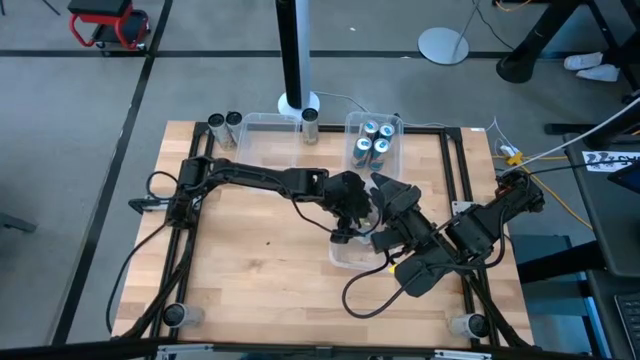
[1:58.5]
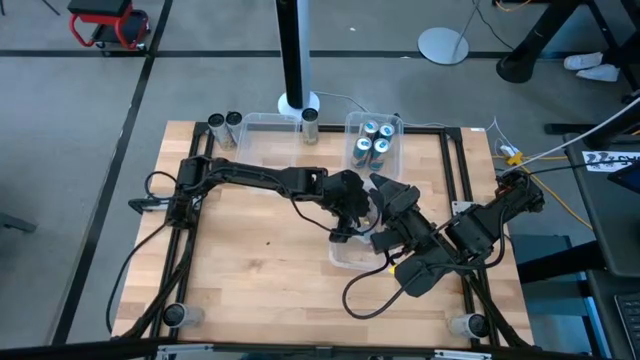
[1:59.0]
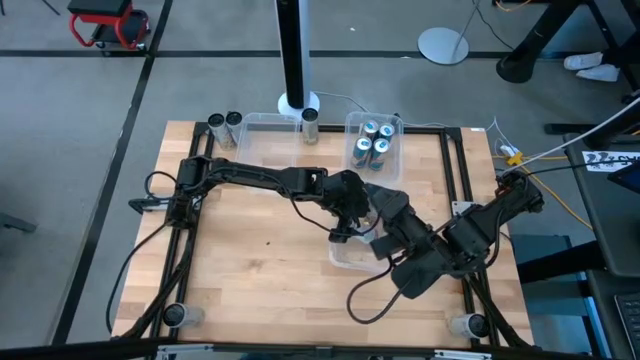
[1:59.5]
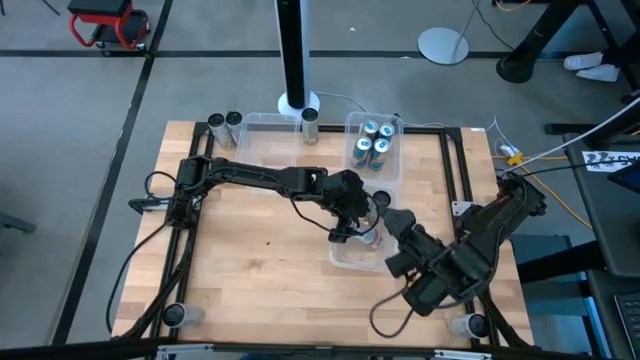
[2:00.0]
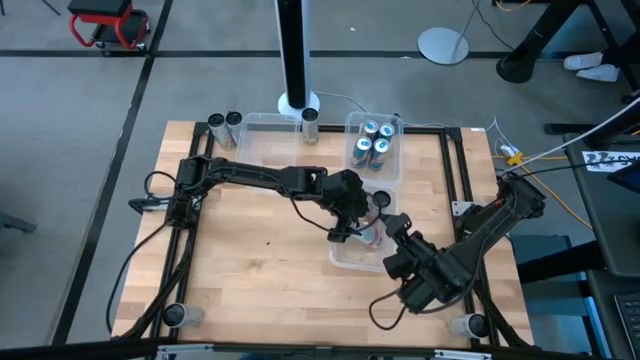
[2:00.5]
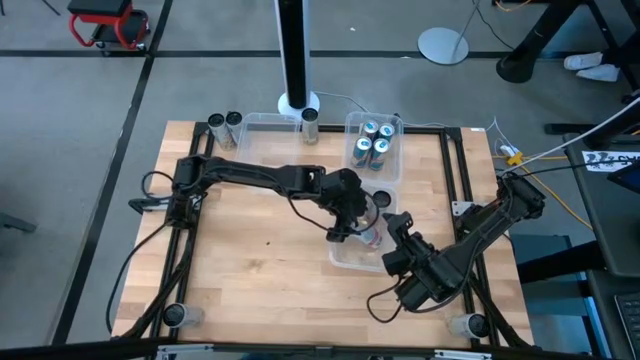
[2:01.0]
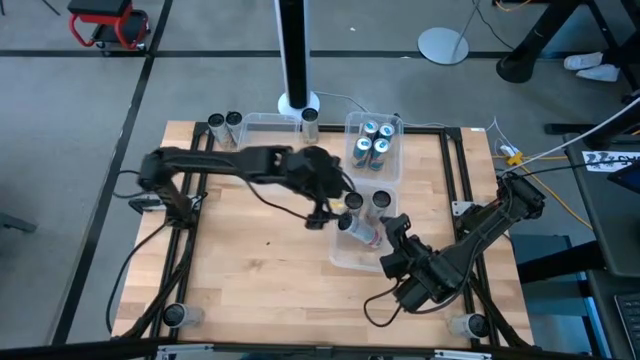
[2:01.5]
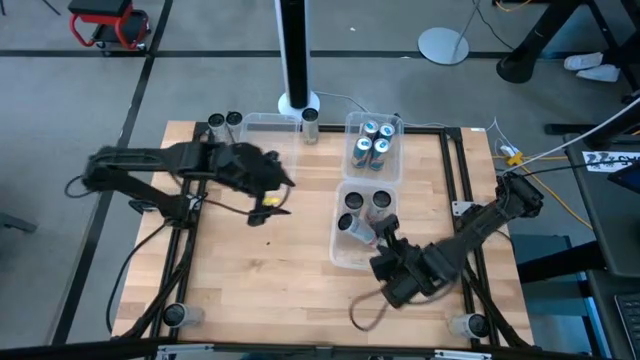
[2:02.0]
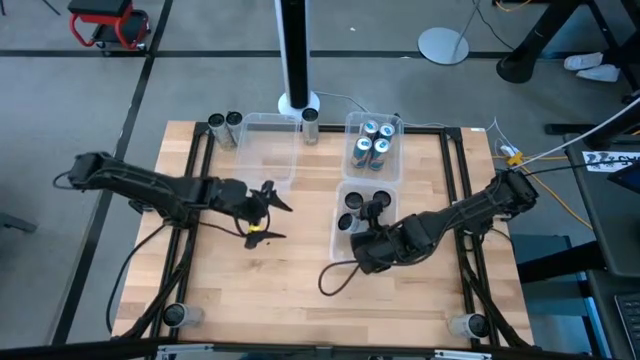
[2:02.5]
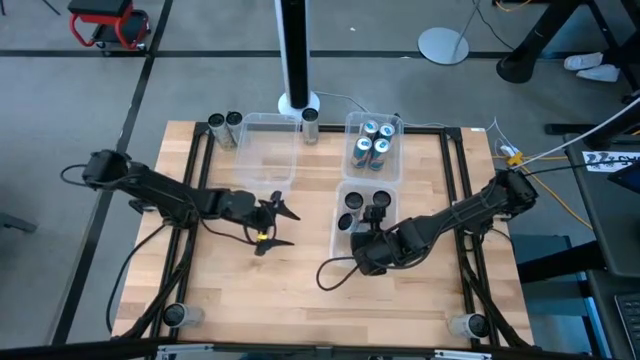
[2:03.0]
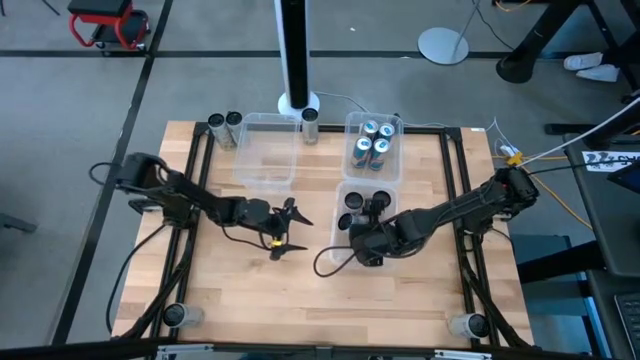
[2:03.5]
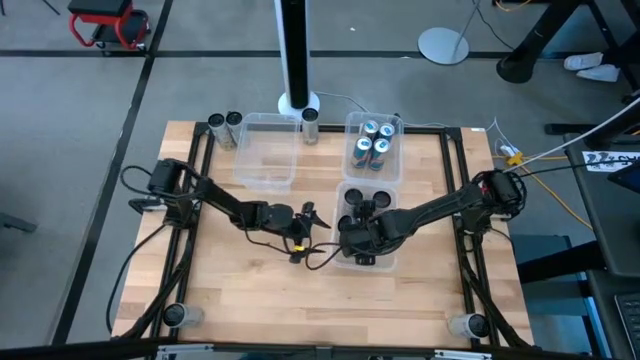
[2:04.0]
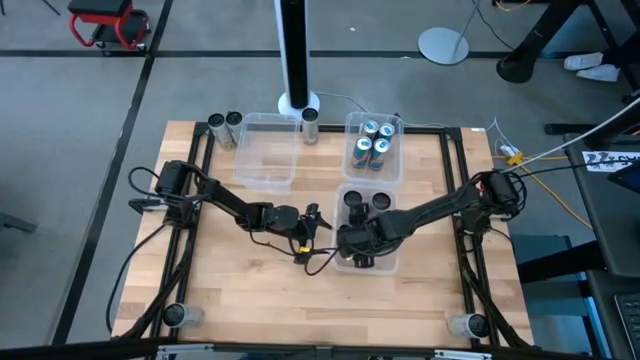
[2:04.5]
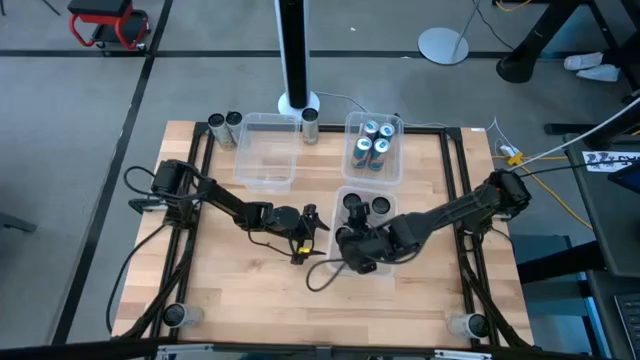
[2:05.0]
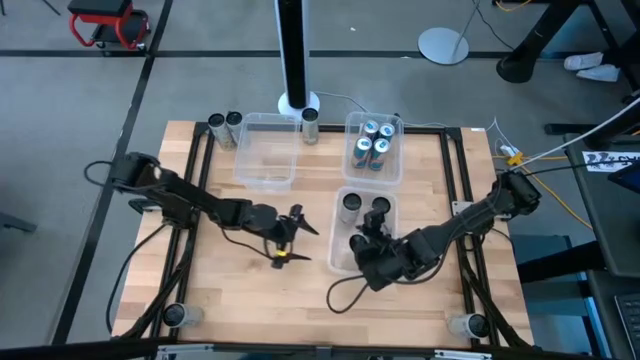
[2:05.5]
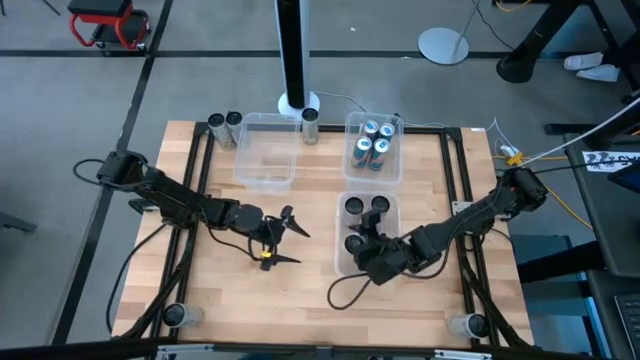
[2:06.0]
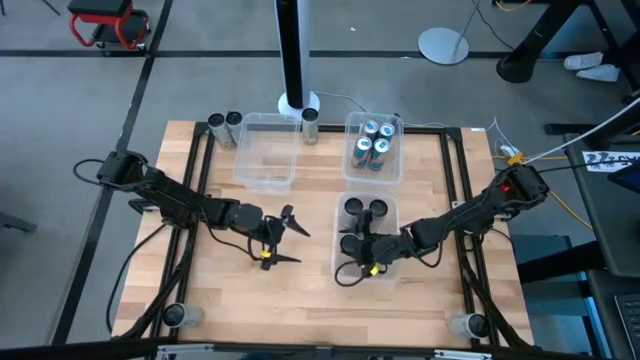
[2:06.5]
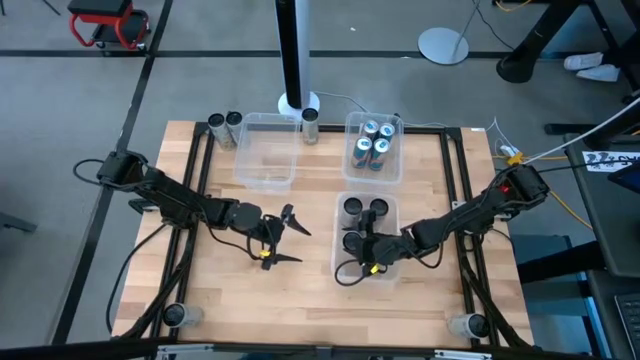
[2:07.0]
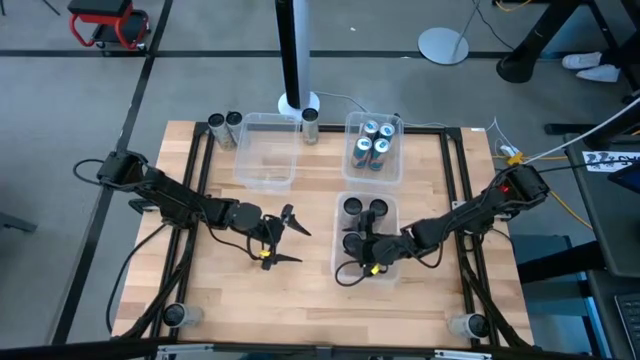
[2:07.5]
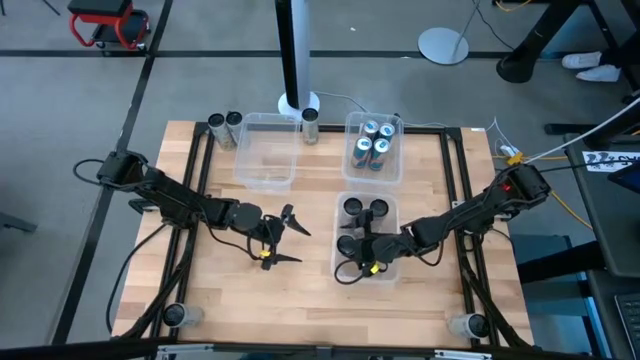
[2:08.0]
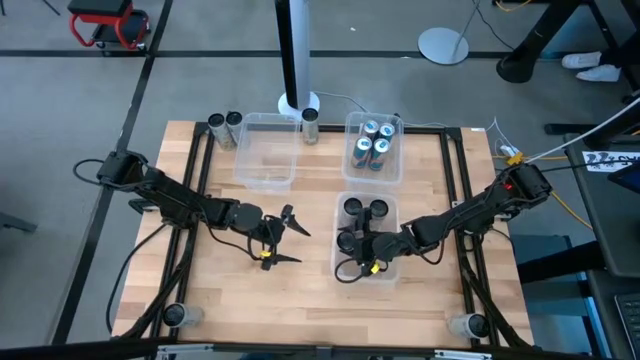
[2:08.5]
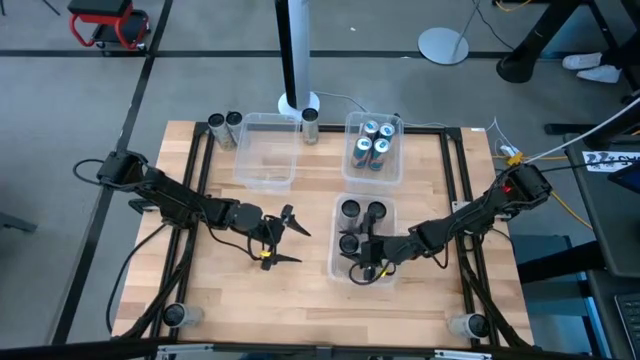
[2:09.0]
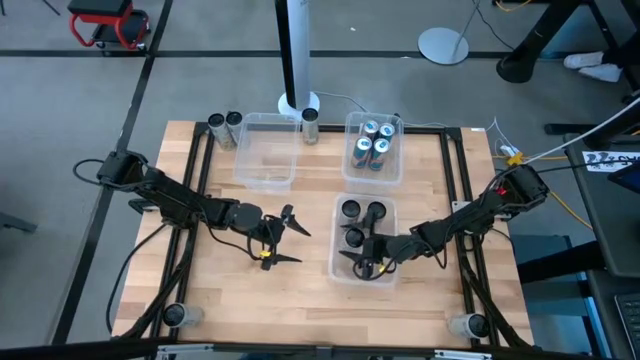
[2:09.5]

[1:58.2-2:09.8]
Task: Sort soda cans
Put the white pink soda can into the bottom right transparent bin

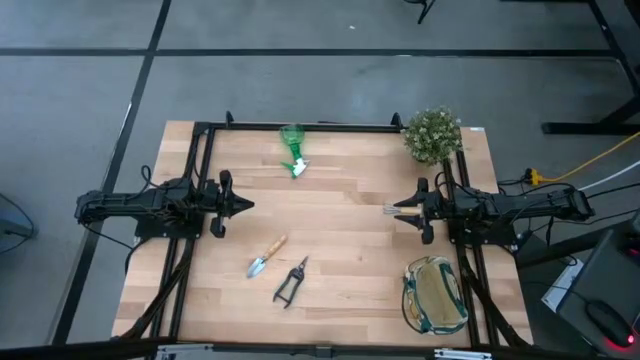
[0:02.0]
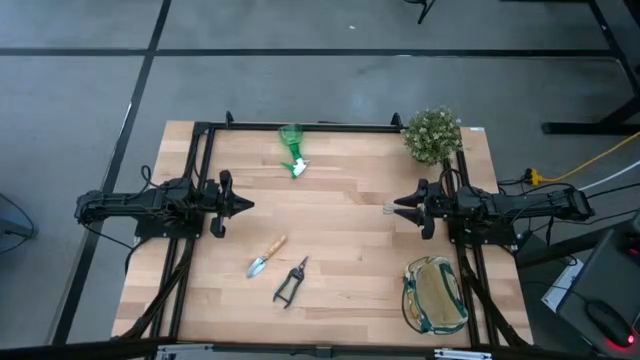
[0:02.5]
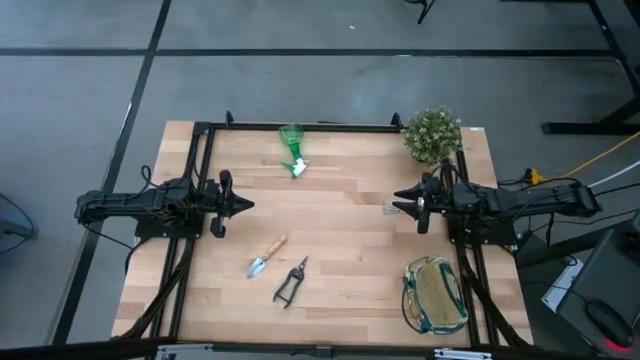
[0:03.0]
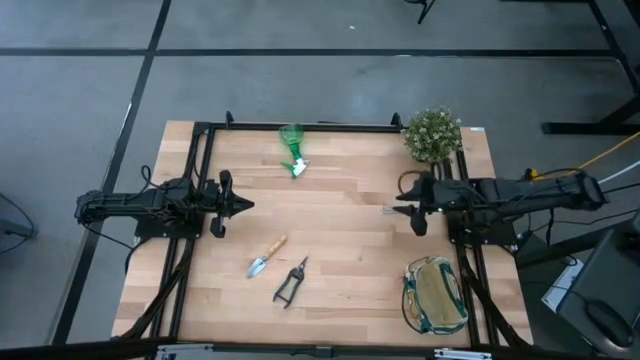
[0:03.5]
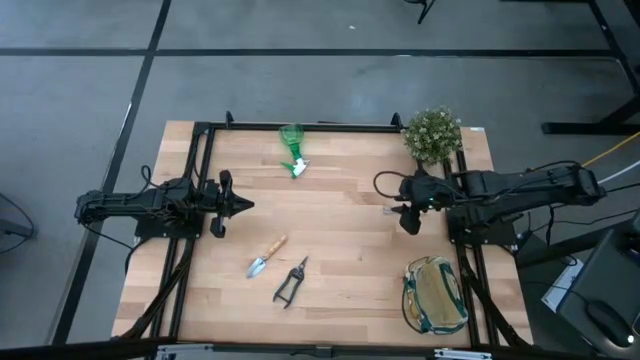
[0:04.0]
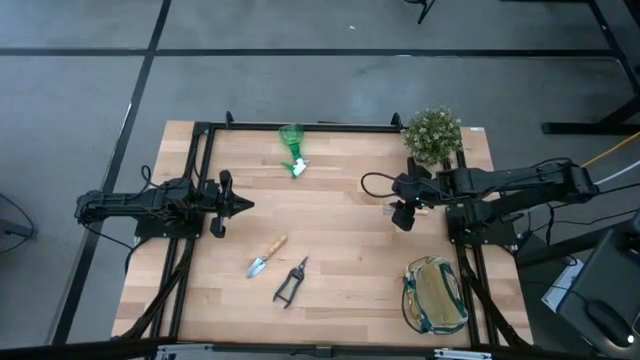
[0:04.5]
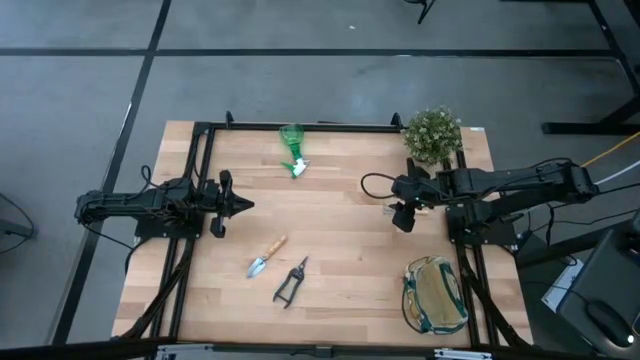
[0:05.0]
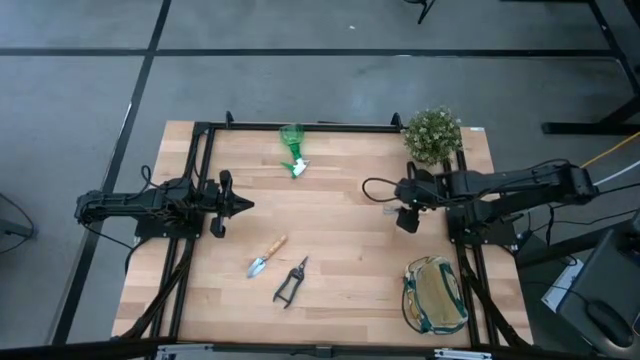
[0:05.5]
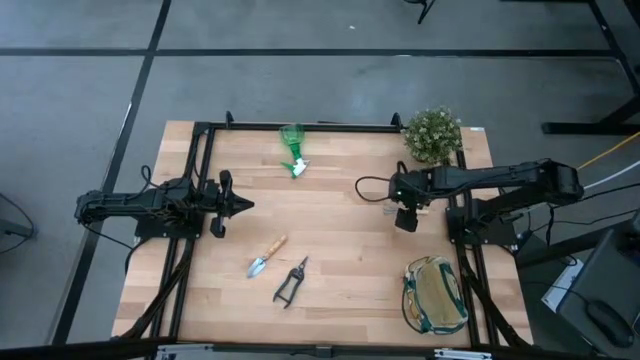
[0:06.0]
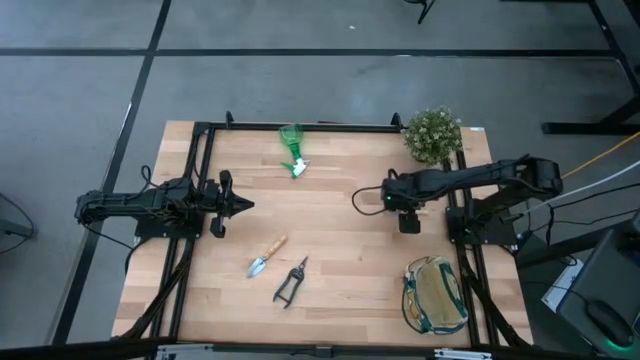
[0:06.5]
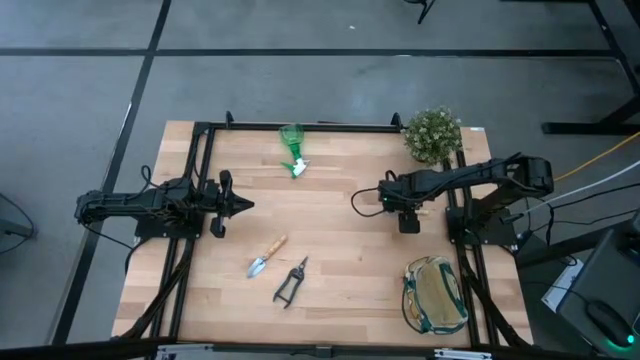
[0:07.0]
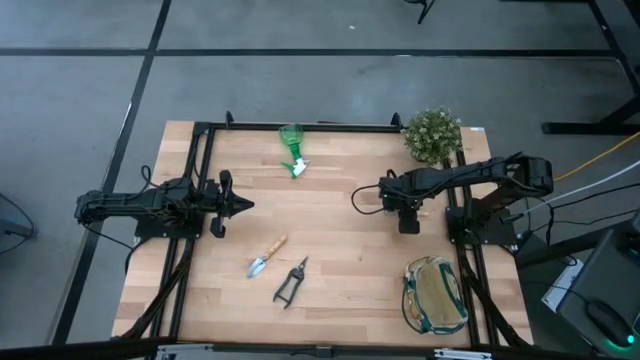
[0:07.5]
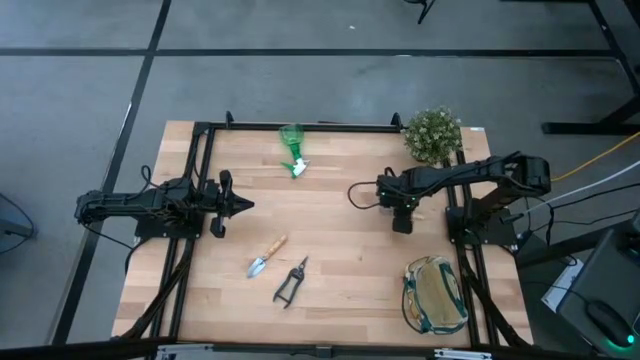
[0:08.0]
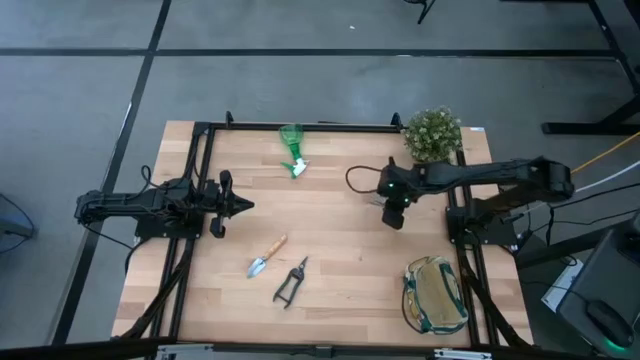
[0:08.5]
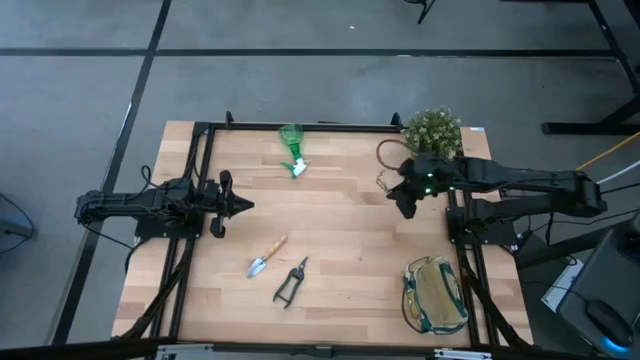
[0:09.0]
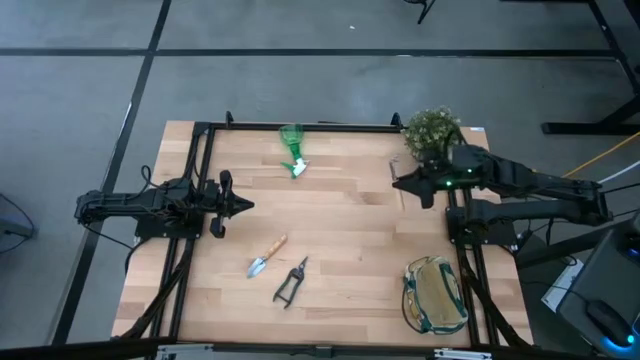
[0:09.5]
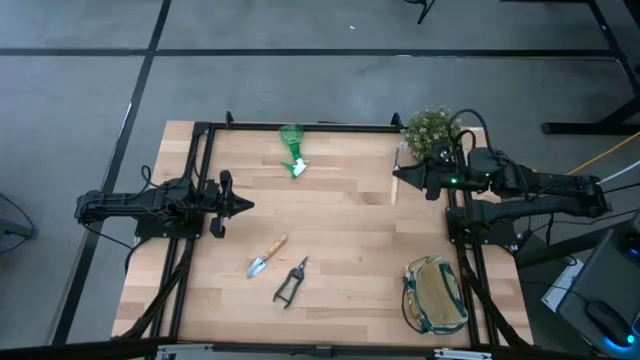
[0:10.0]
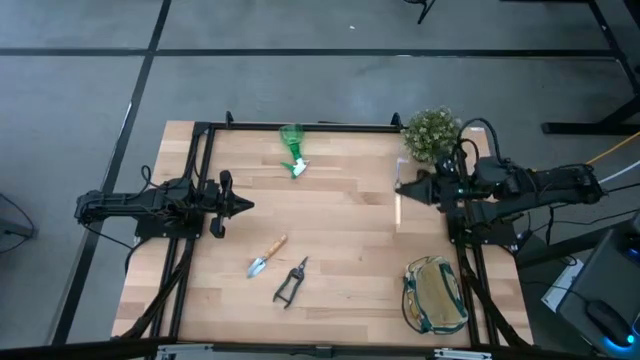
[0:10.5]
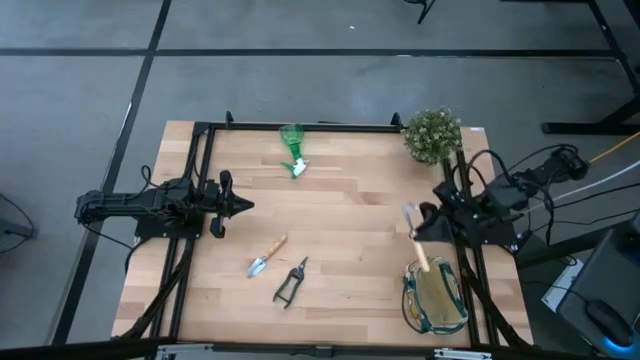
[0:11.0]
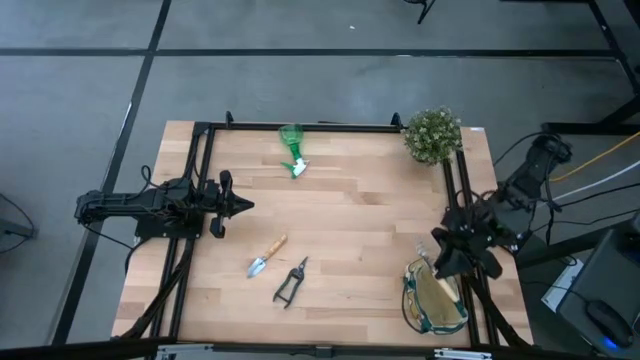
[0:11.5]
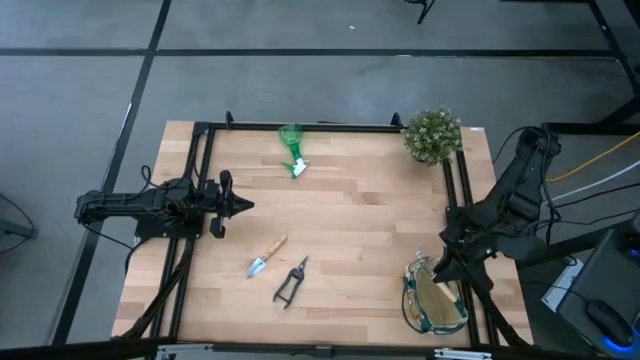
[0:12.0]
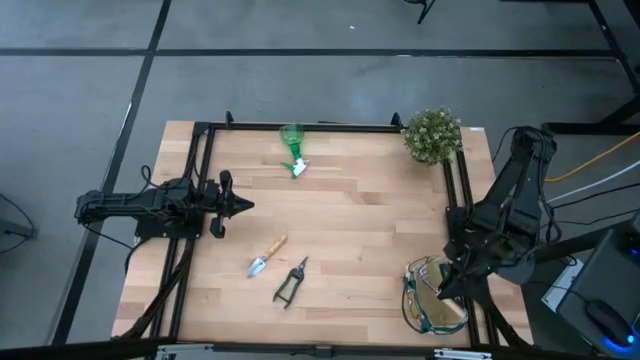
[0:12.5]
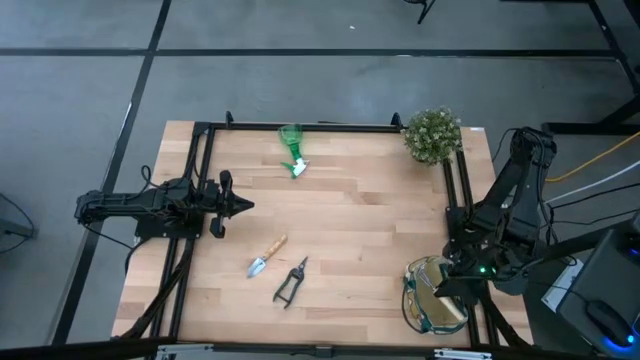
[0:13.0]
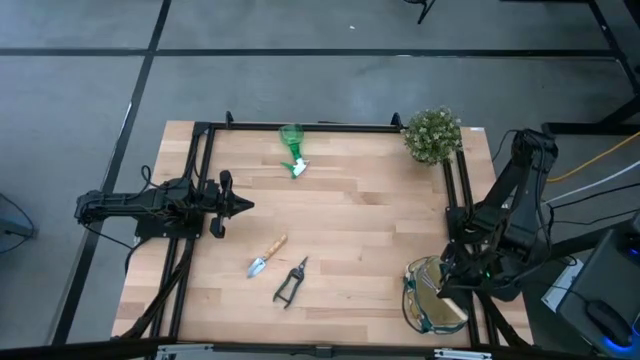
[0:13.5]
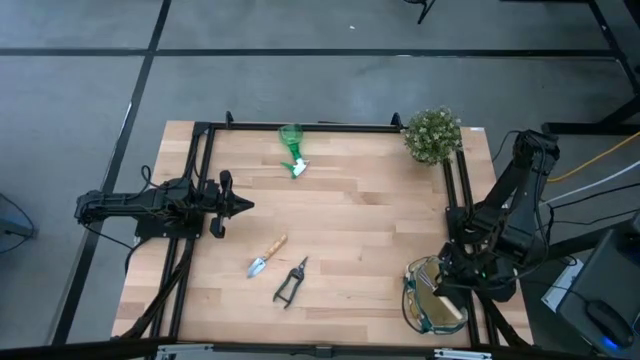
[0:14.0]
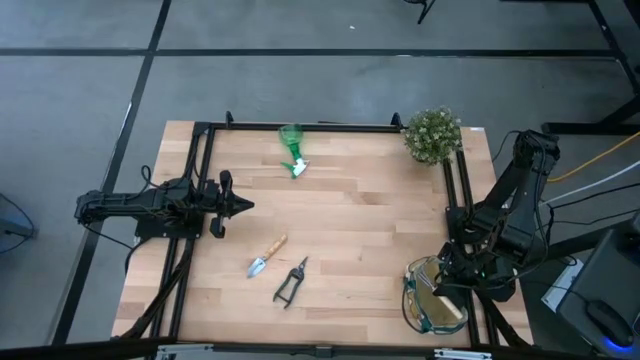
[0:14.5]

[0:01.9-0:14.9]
Task: Pick & Place Garden tools in Gardening bag
Put the hand rake into the gardening bag
